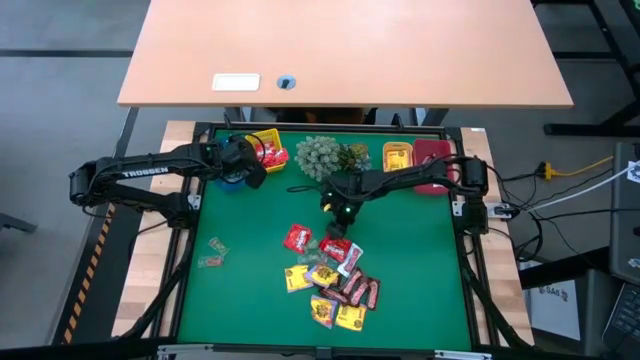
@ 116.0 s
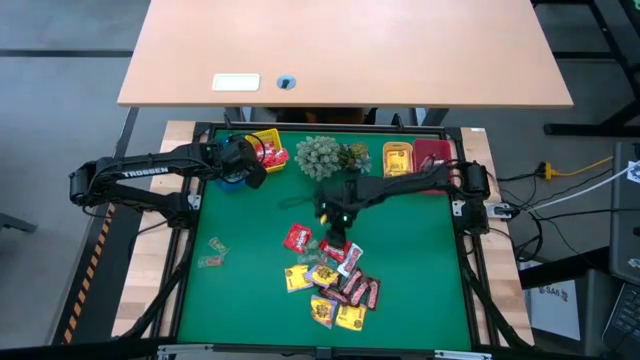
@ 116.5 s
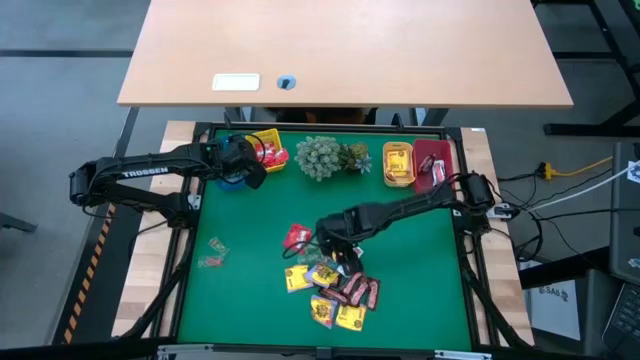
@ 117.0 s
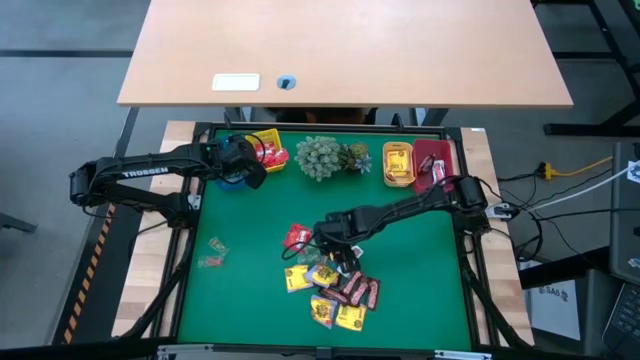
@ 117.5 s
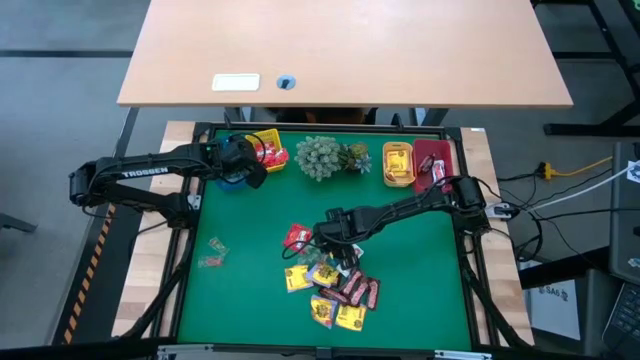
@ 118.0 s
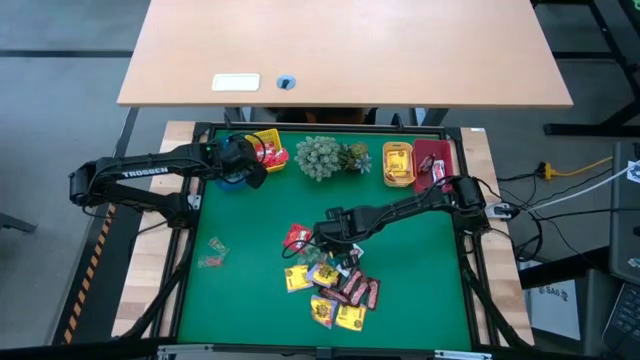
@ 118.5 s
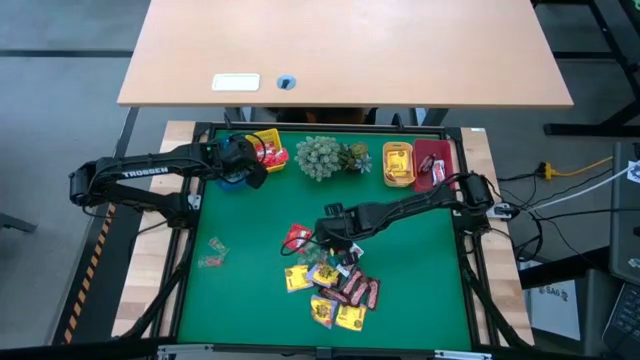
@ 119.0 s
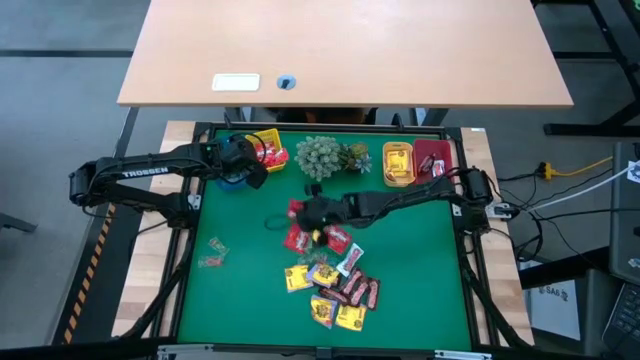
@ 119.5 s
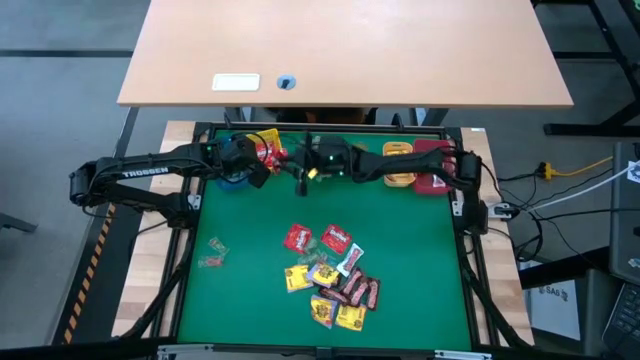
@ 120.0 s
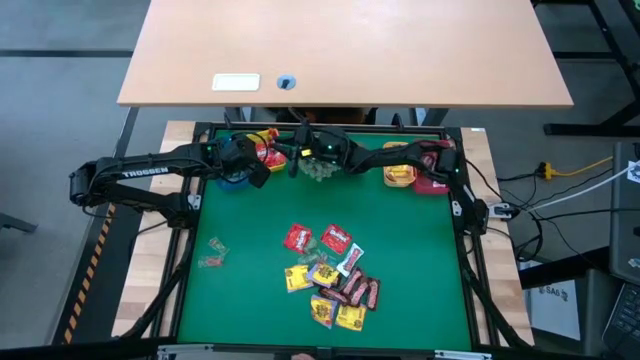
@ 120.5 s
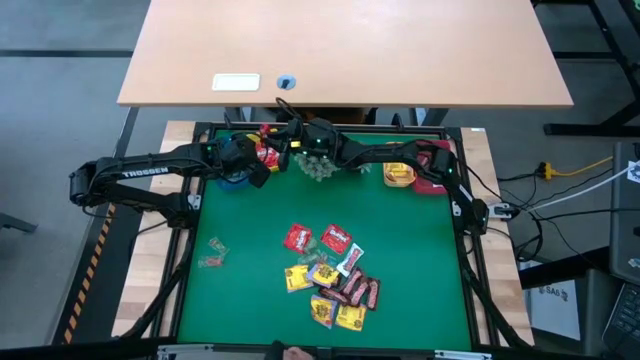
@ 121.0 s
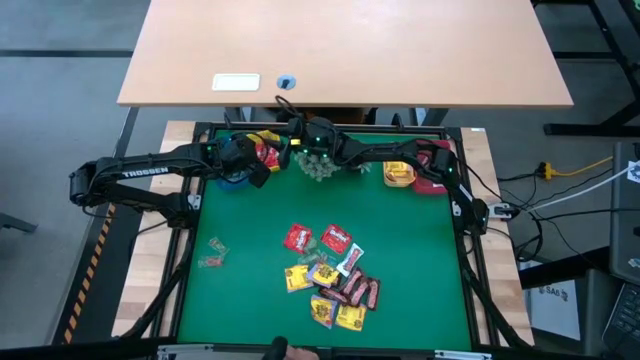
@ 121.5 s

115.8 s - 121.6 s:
Task: Sort candy
Put the red candy into the yellow bin

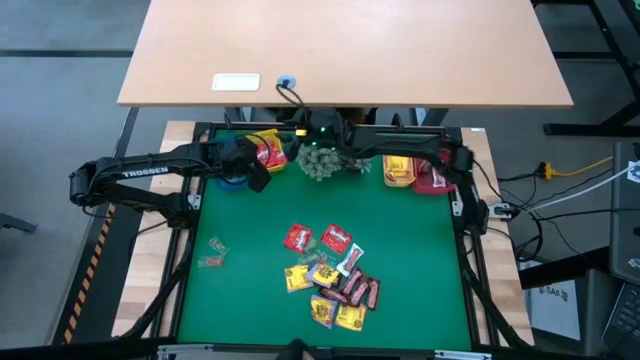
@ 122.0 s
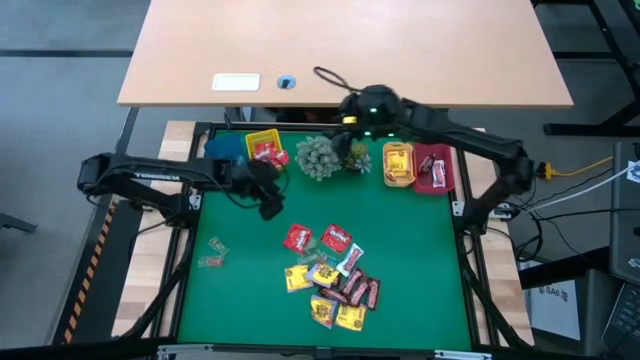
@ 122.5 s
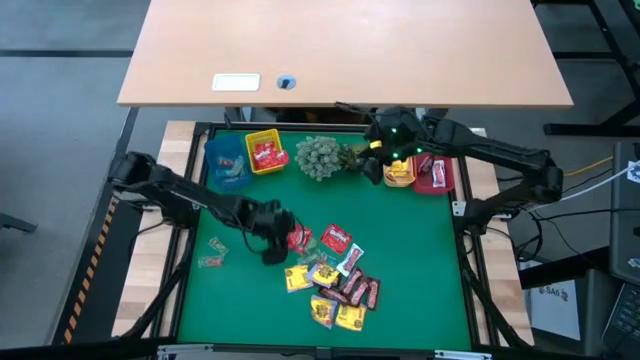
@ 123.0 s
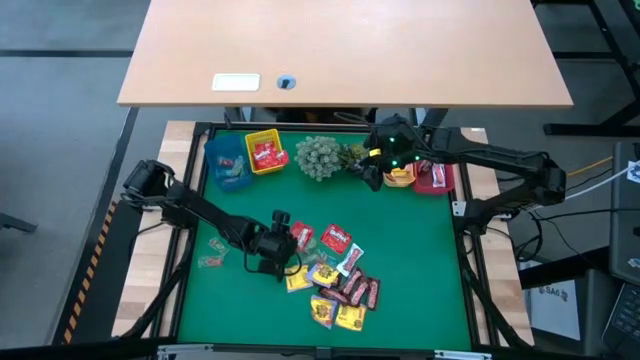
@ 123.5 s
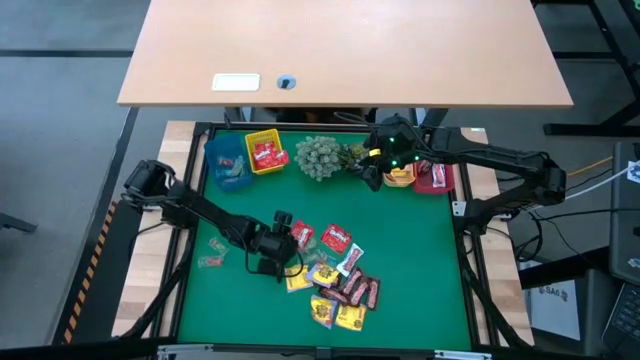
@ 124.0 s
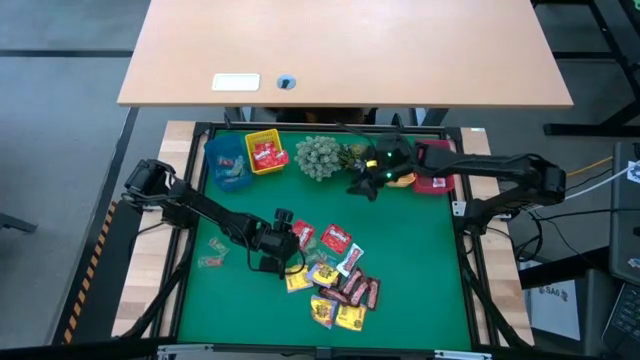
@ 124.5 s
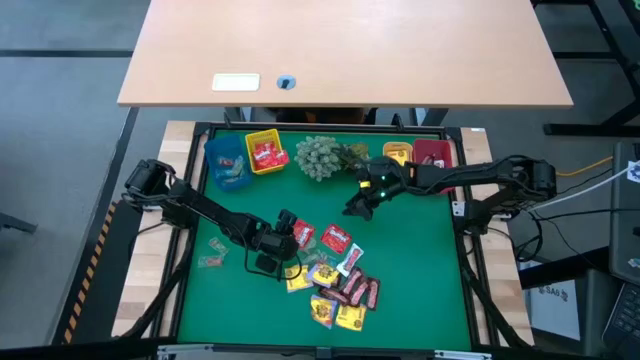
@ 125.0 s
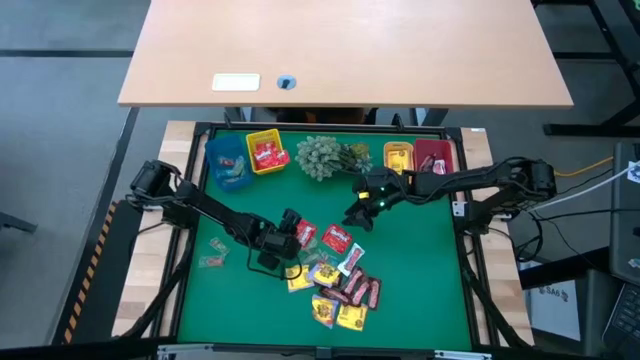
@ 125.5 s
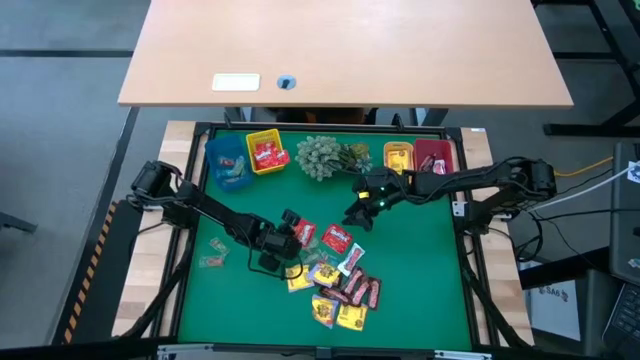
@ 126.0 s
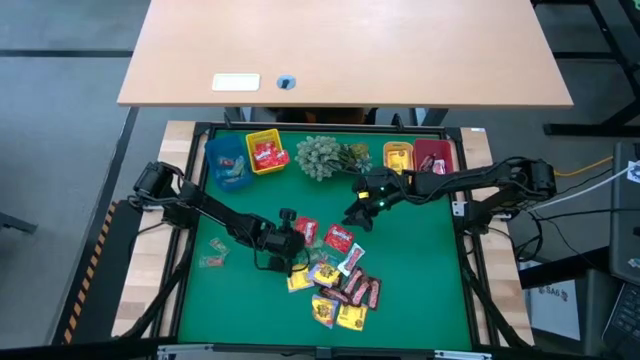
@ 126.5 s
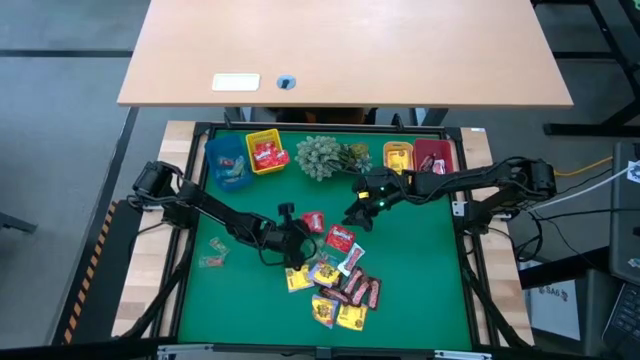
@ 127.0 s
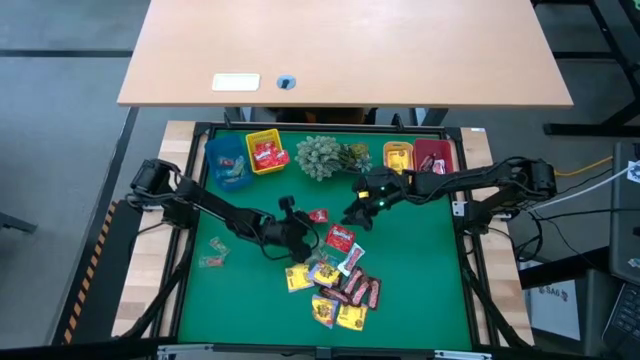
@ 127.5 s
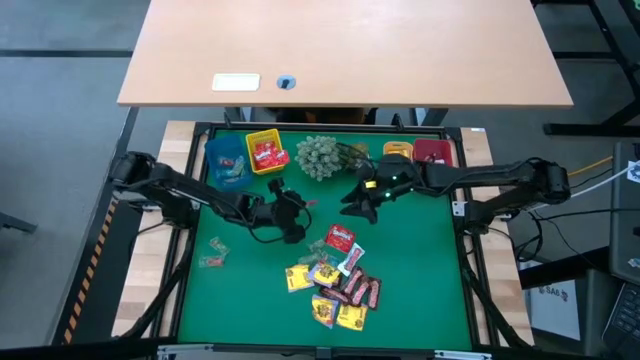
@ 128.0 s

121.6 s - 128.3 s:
Put the red candy into the yellow bin

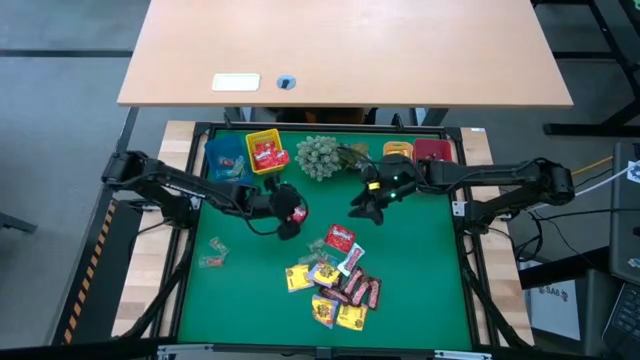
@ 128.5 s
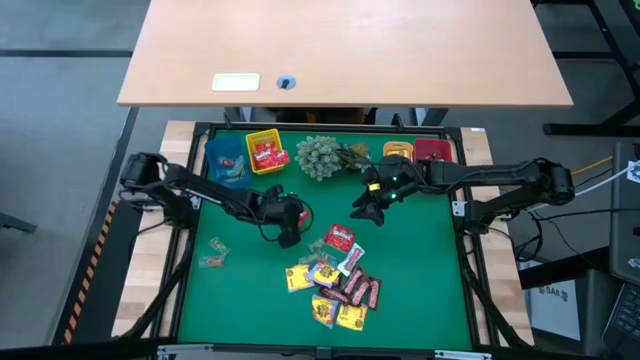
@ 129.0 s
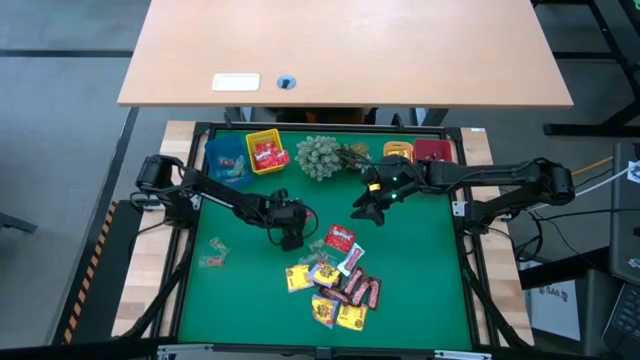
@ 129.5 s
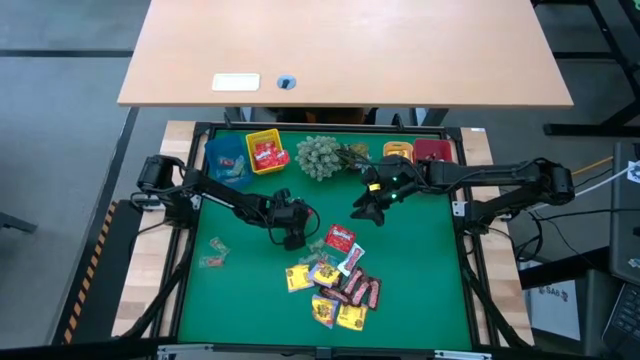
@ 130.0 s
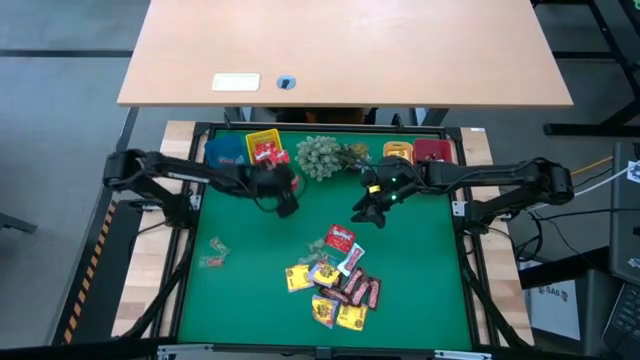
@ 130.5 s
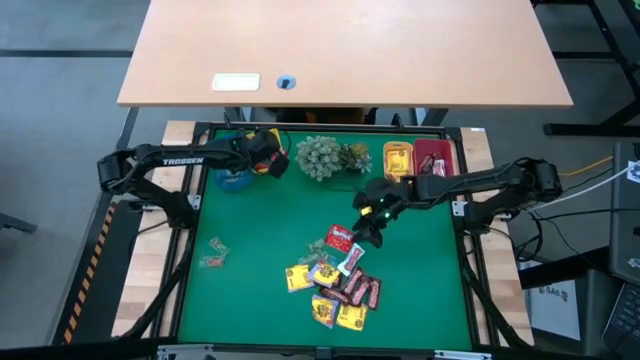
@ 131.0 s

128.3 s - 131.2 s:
Put the red candy into the yellow bin

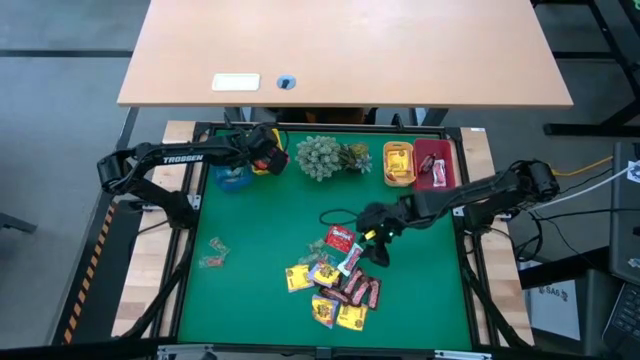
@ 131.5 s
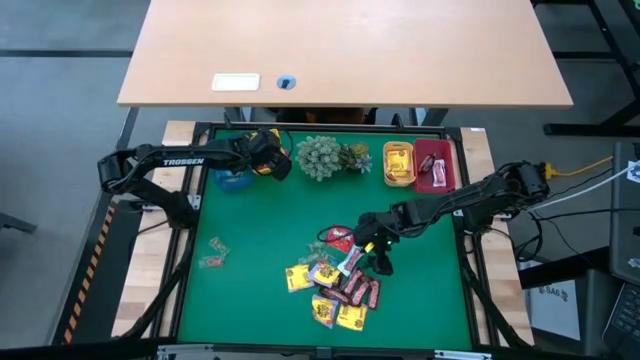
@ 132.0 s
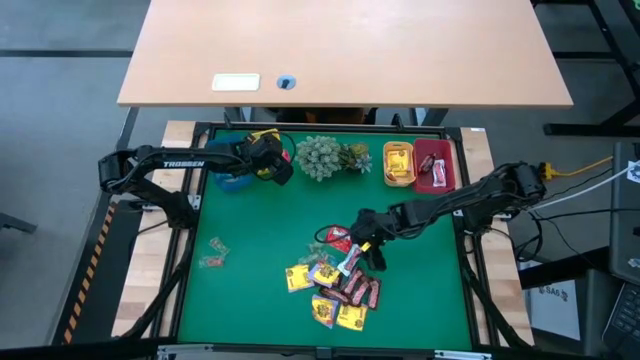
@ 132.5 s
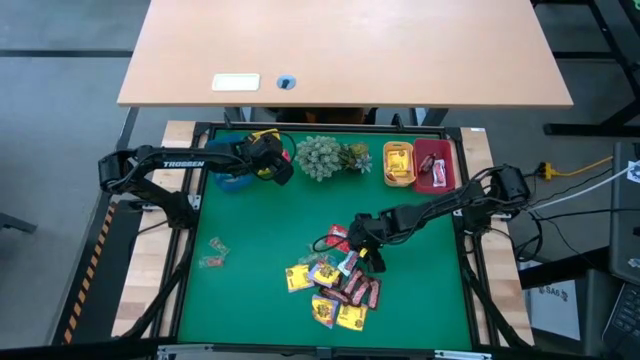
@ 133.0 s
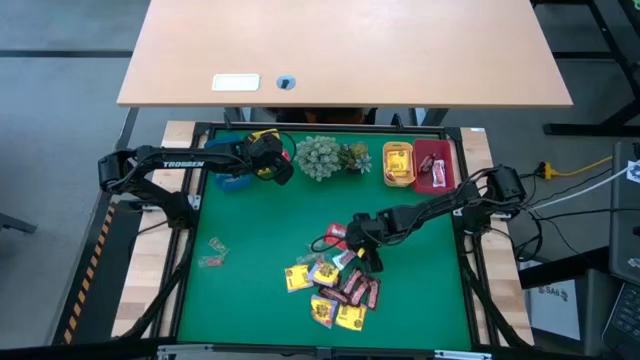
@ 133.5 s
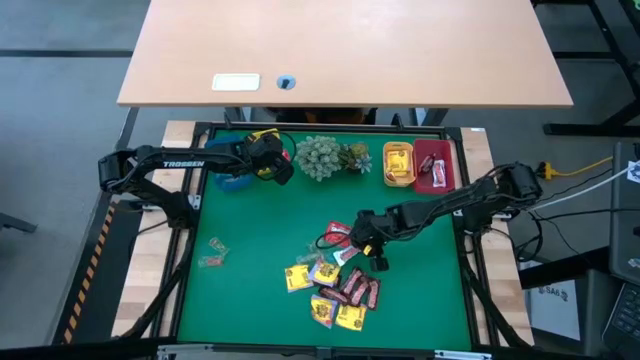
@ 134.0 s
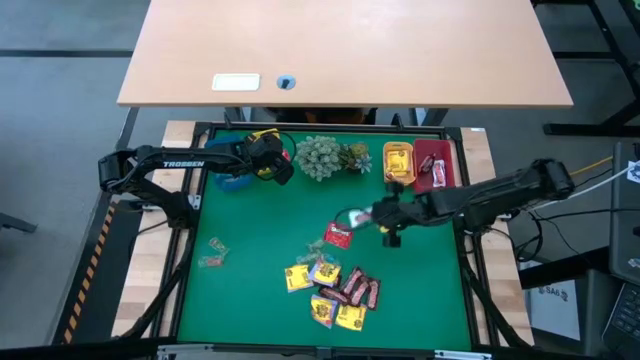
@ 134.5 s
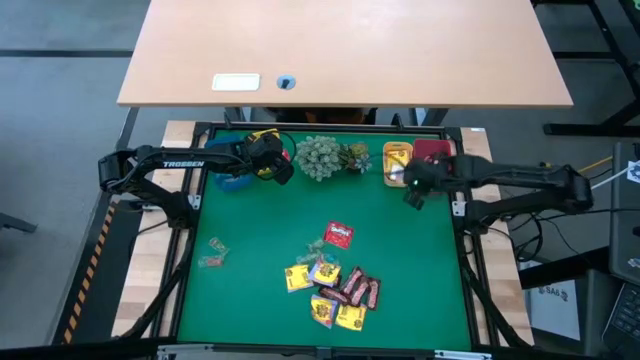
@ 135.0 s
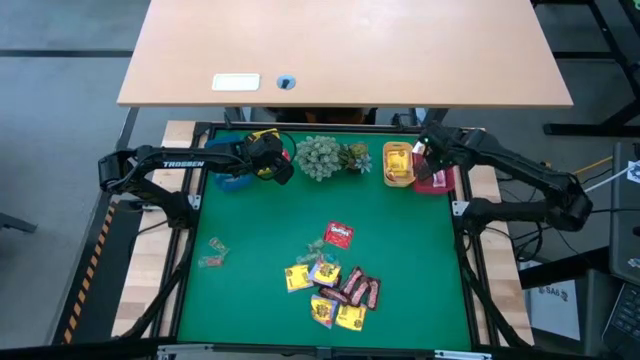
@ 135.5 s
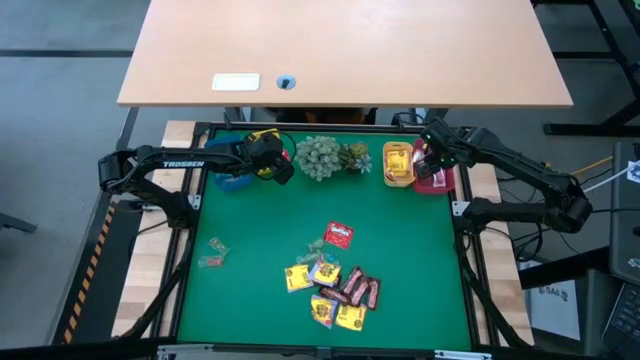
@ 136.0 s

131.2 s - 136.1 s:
Put the white chocolate into the red bin

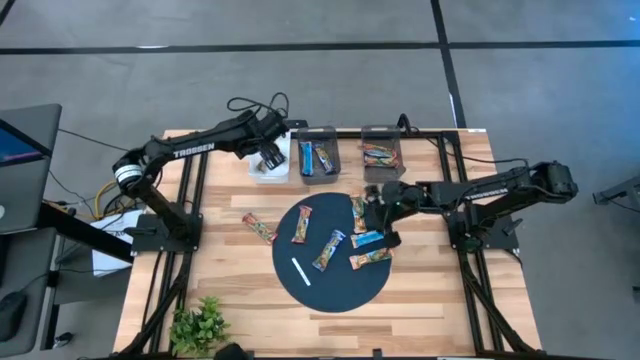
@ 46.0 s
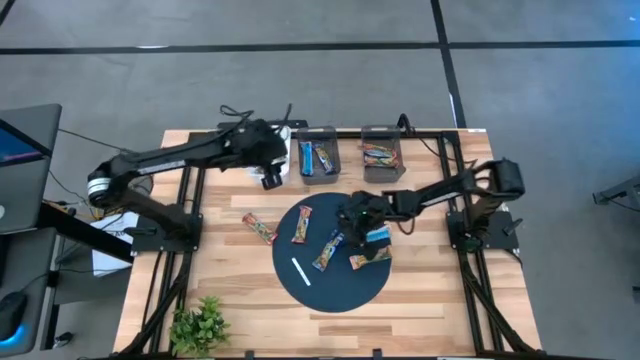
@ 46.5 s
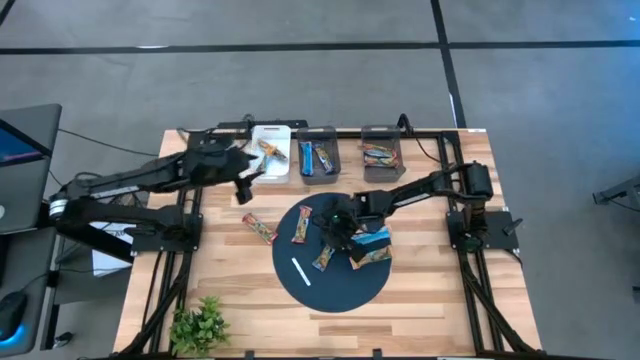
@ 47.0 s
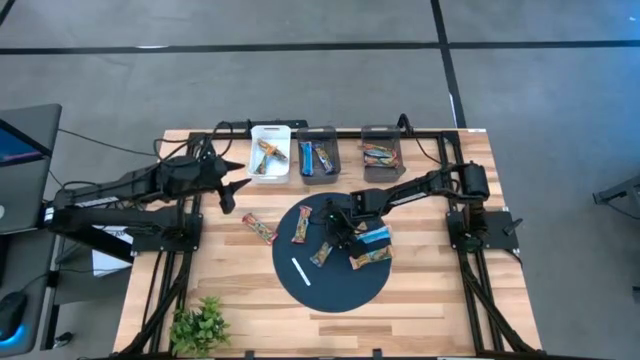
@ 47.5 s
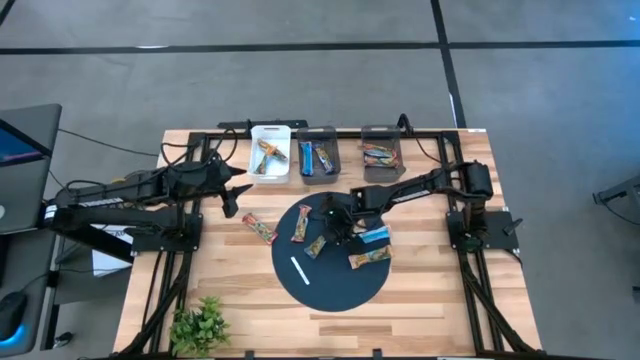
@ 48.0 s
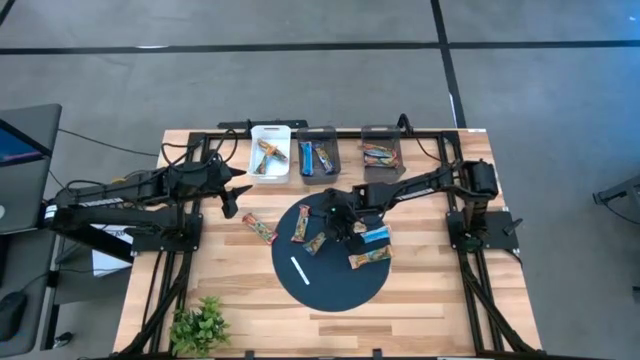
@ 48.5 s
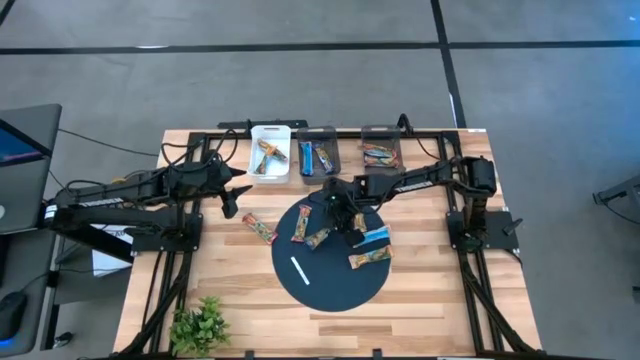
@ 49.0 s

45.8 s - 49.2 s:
Task: Pick and place Granola Bars by type
Adjust the blue granola bar
